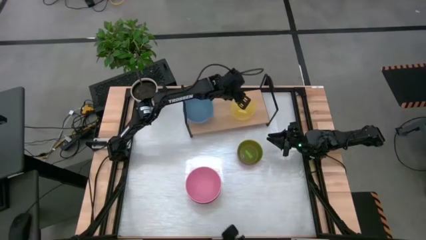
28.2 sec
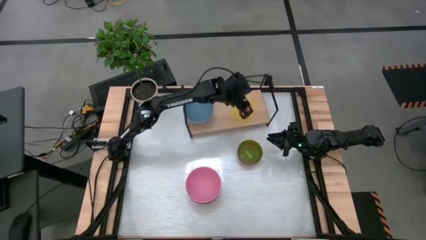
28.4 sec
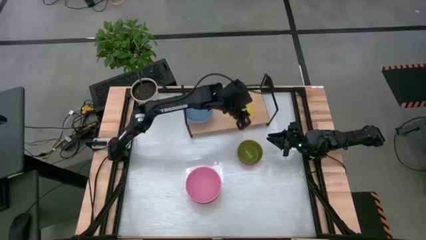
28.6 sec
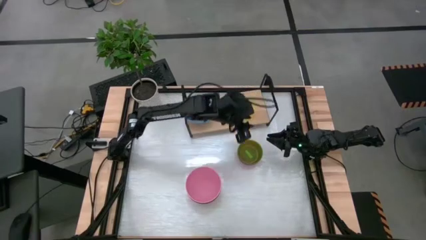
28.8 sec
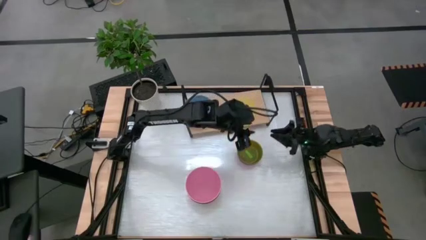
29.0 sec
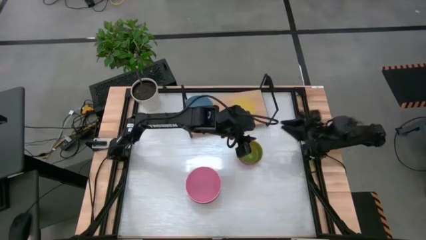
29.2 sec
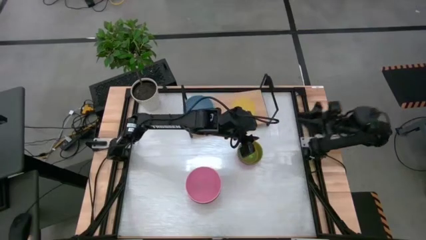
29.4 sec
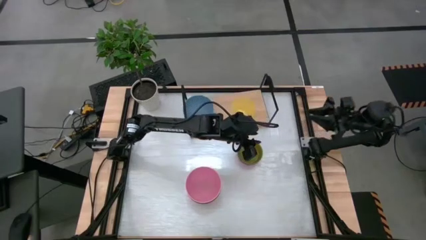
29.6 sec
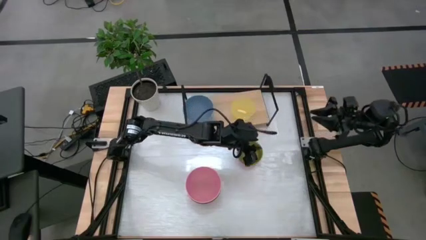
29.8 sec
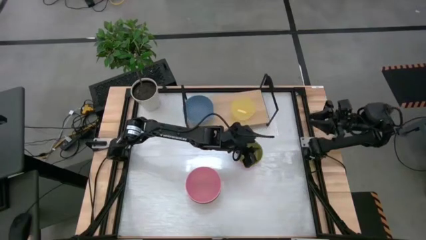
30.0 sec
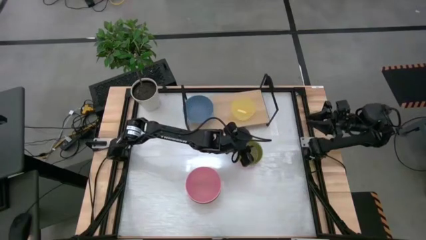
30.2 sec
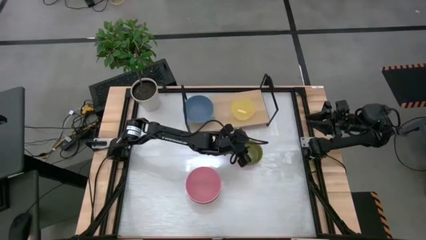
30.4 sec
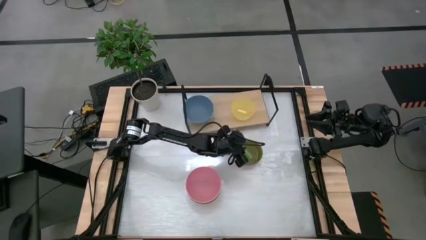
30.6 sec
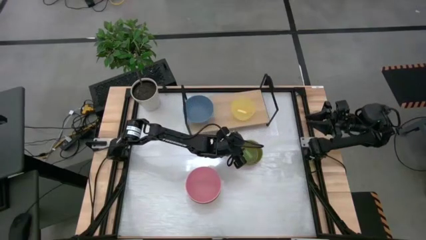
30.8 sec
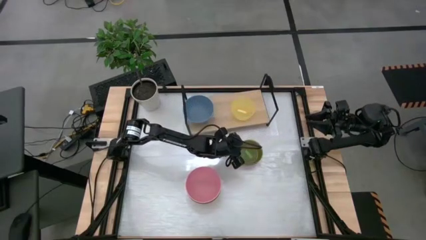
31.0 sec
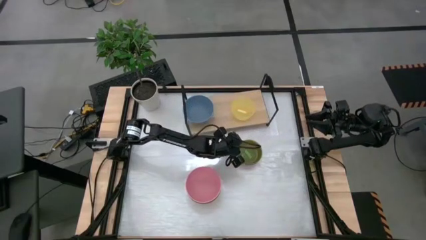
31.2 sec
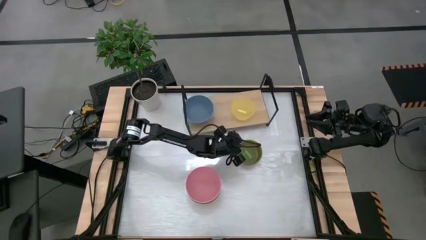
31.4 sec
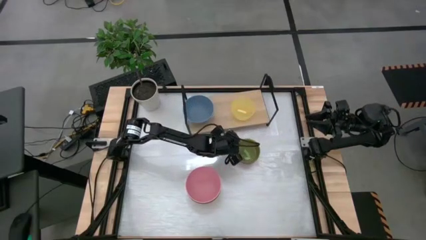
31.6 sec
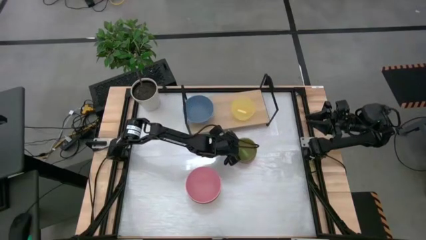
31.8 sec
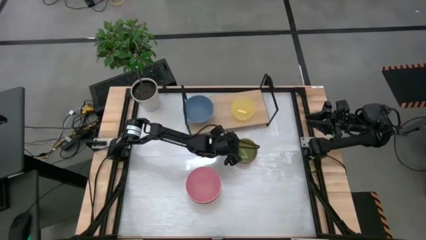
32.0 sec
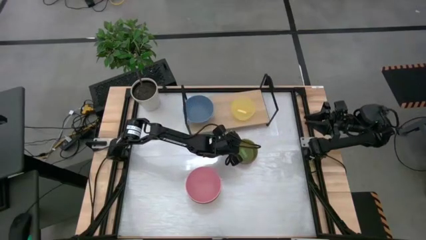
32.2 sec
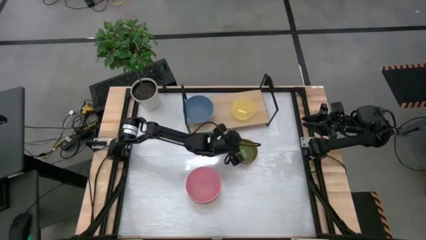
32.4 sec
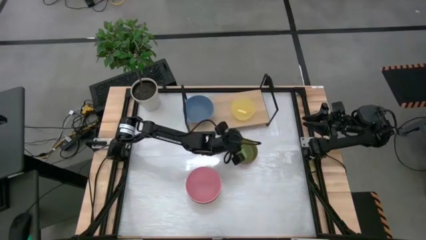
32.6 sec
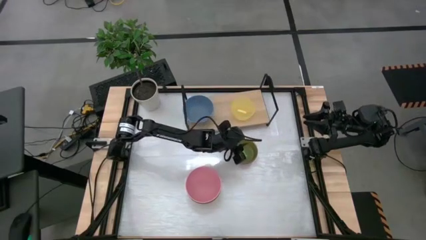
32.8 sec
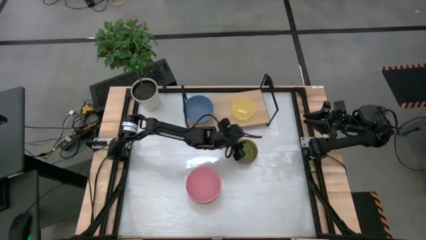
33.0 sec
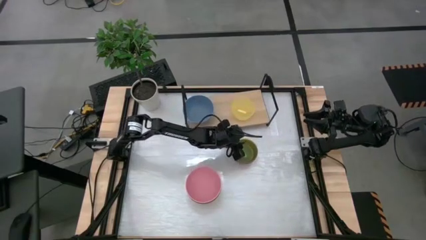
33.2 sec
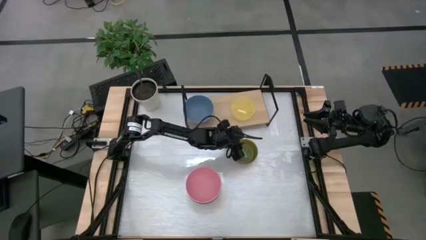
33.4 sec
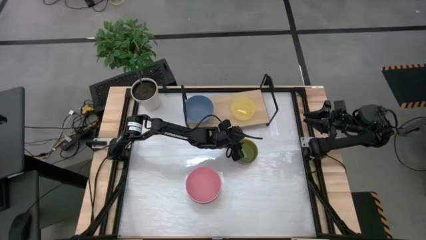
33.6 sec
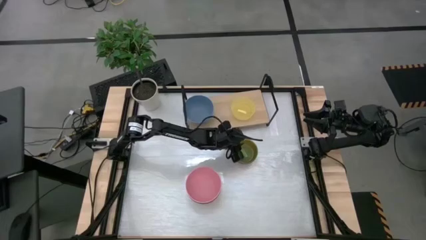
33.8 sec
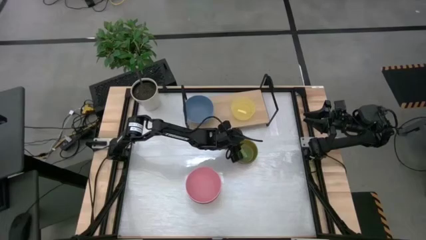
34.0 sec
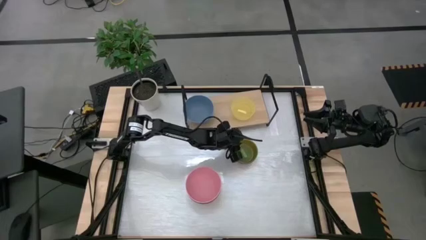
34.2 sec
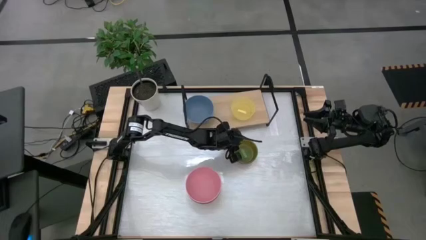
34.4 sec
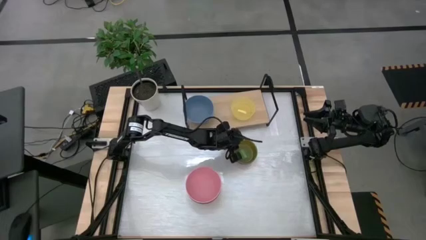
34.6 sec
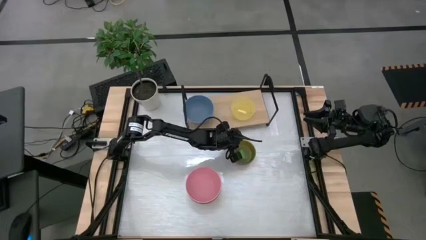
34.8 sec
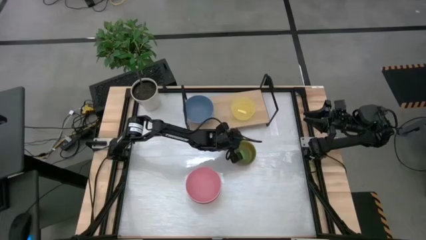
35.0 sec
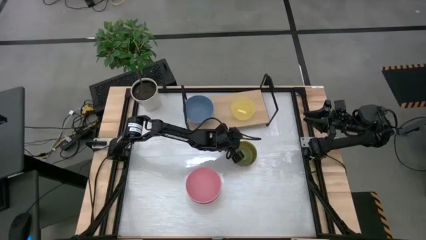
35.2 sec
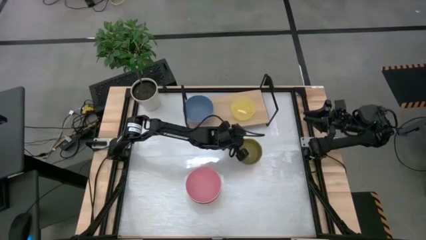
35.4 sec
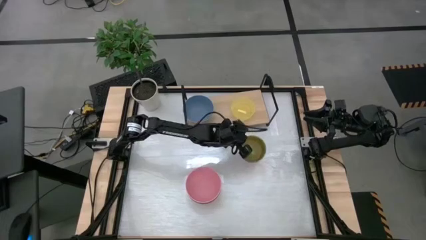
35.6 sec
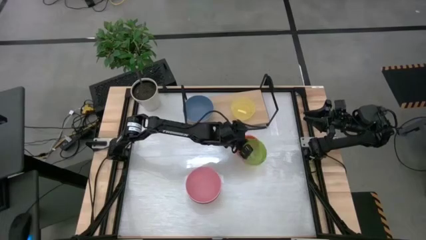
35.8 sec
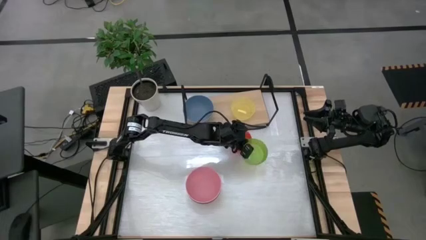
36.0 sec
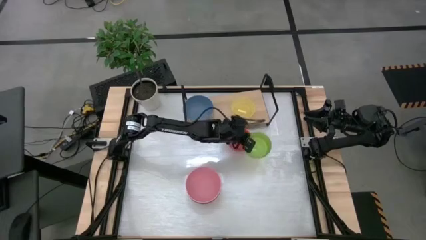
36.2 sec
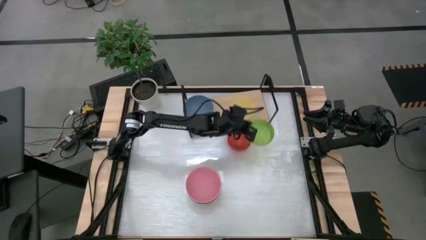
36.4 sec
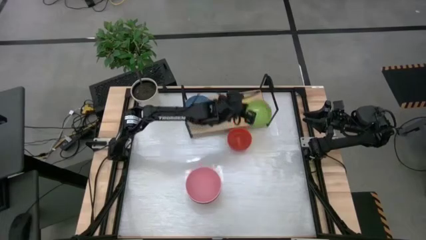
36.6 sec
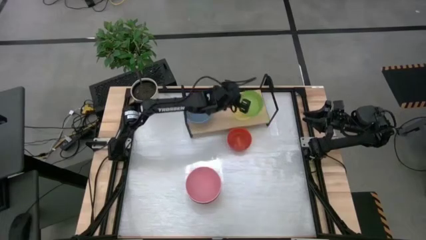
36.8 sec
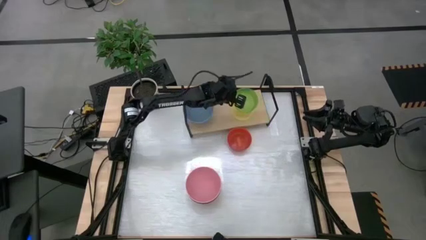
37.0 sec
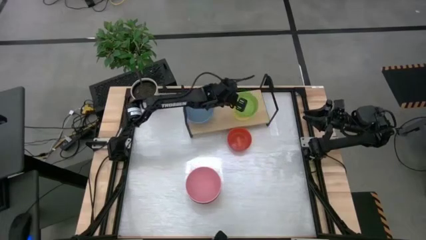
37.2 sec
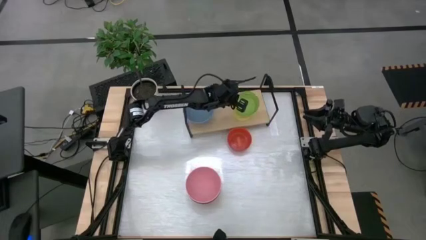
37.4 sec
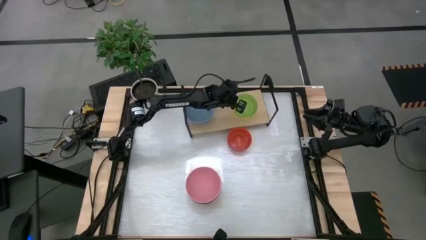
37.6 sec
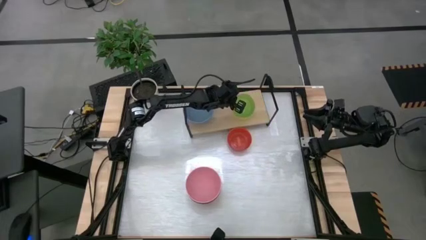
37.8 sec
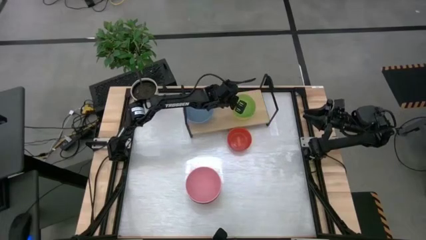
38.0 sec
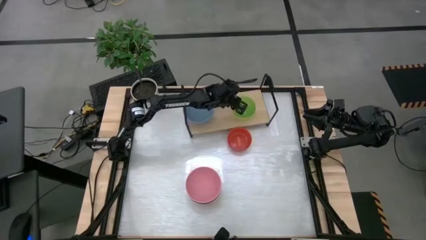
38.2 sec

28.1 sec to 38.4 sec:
Task: Place and stack bowls onto a shelf
Stack the small green bowl on top of the small yellow bowl on the shelf

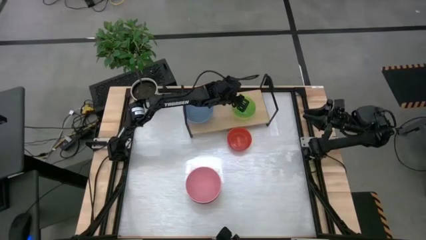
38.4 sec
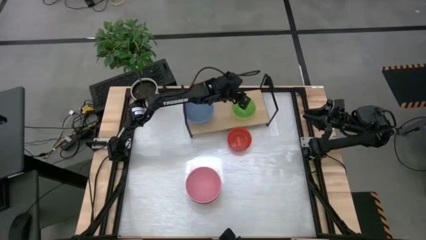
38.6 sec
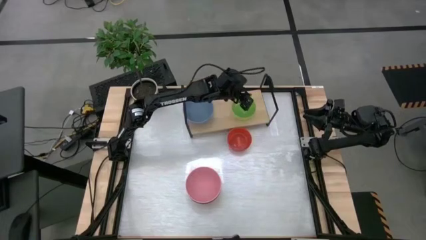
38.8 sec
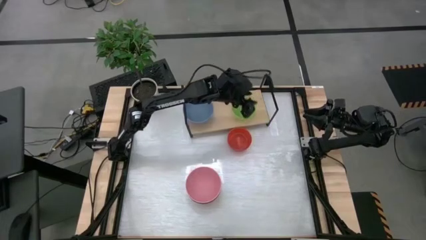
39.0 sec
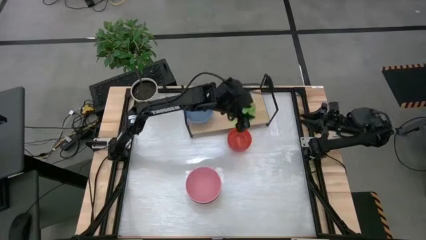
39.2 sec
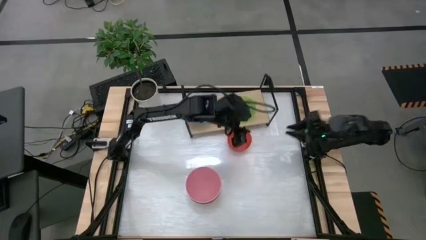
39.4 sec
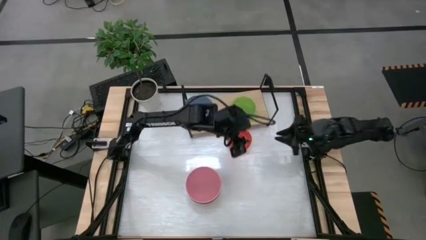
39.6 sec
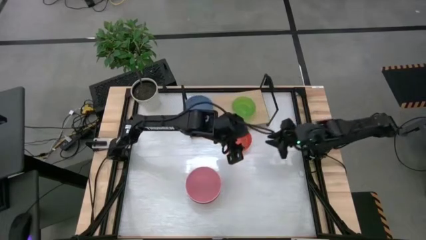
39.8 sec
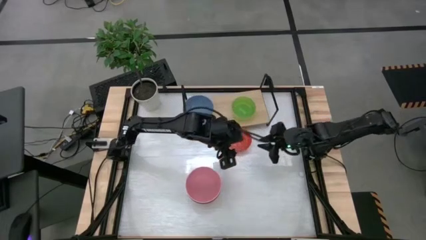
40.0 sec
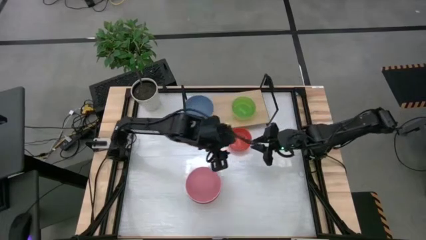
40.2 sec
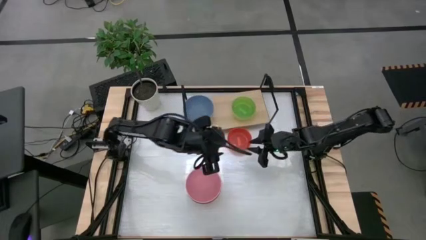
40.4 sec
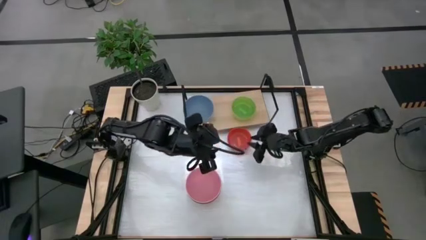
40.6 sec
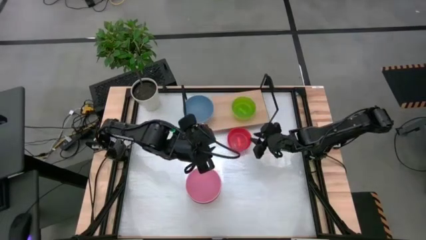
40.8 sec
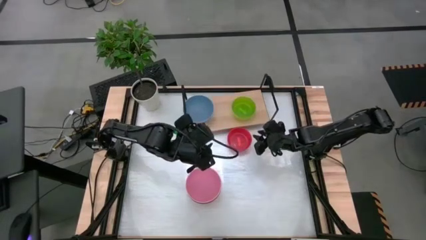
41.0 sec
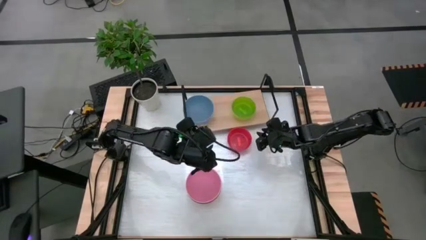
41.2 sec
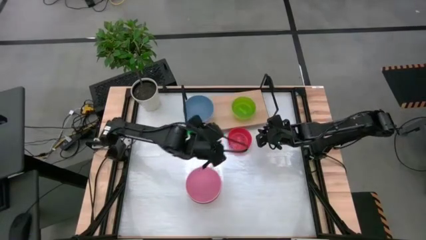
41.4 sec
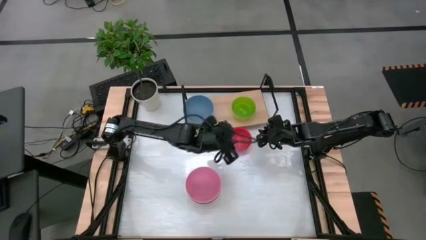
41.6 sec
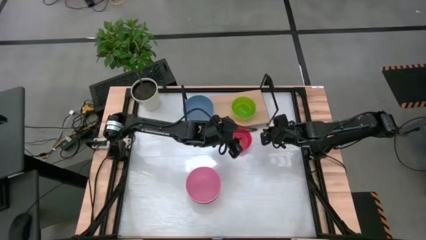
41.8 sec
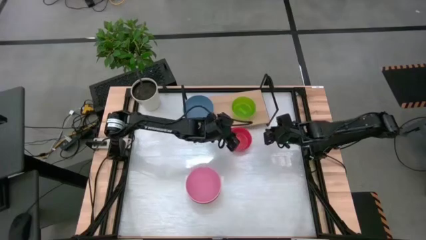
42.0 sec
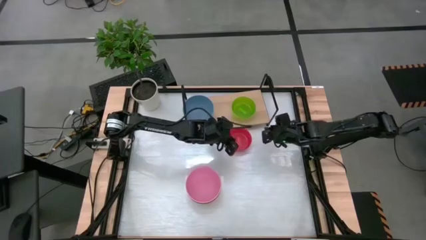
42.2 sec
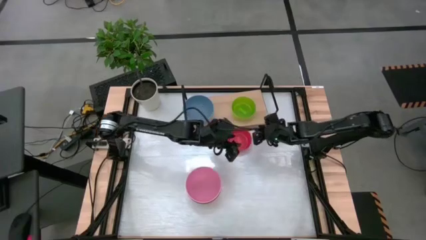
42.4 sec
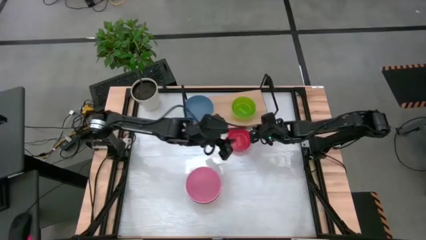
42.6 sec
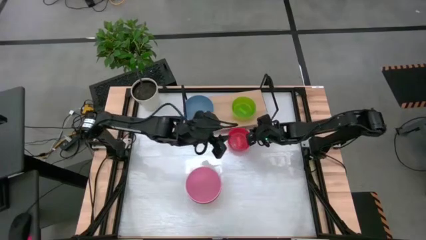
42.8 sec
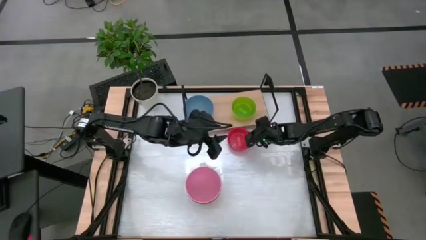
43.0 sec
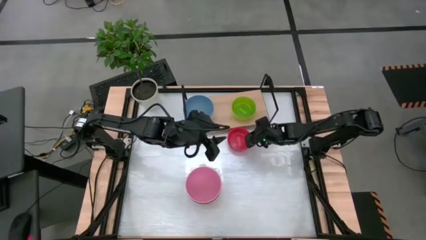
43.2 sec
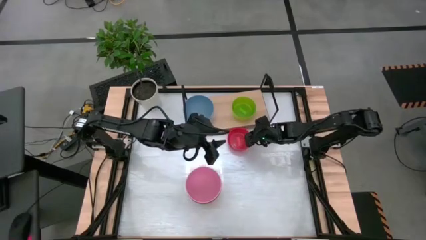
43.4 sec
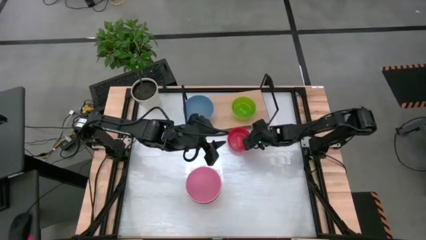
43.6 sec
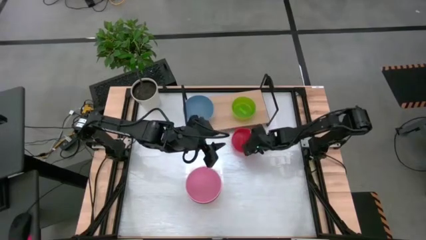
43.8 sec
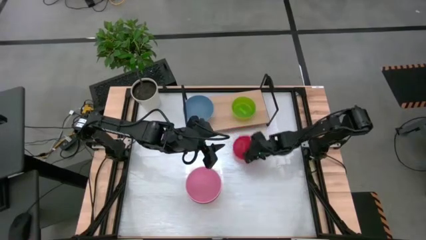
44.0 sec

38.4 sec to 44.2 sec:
Stack the small orange bowl on top of the small green bowl on the shelf
